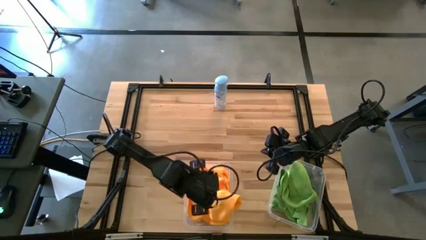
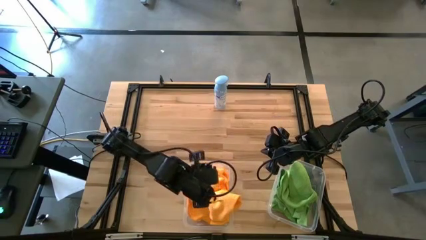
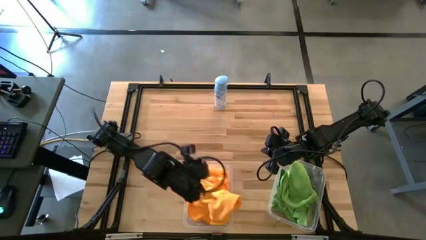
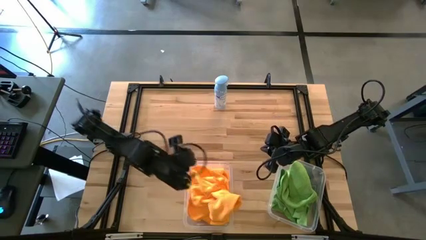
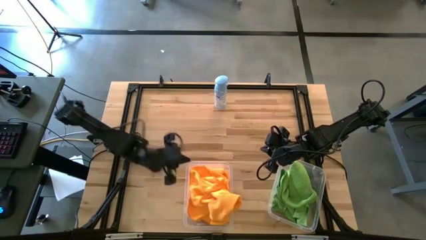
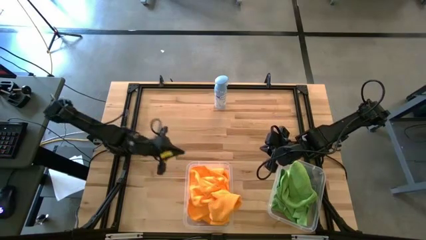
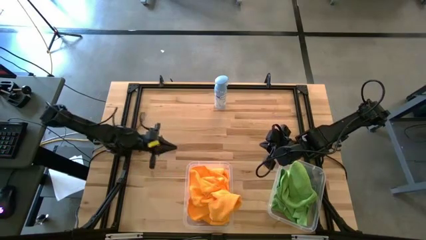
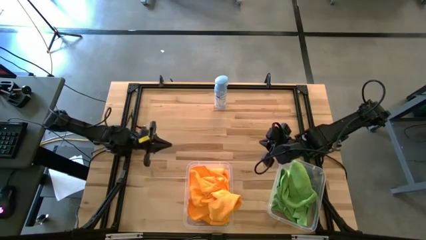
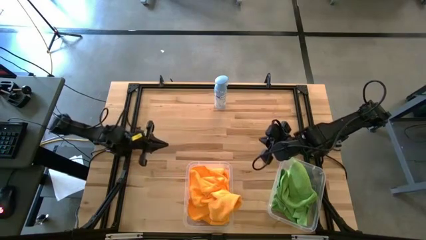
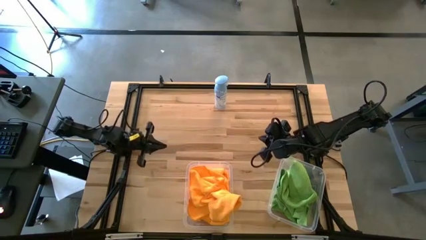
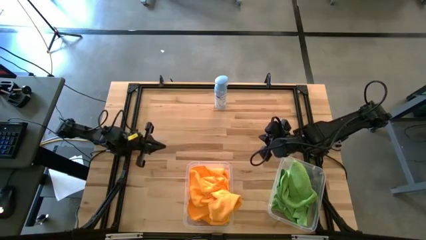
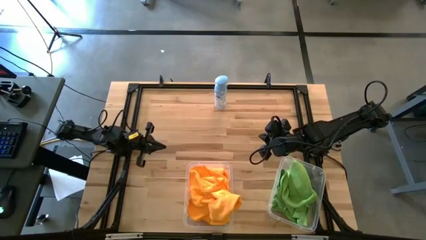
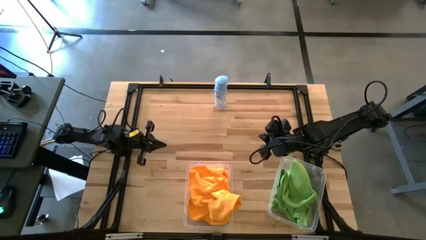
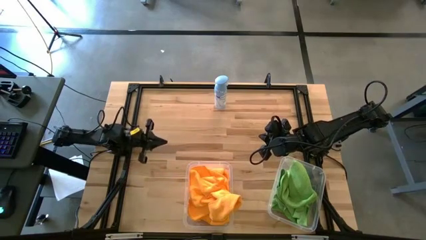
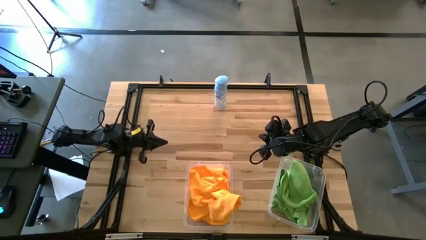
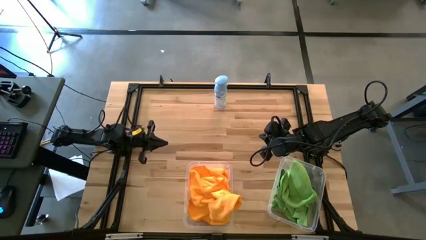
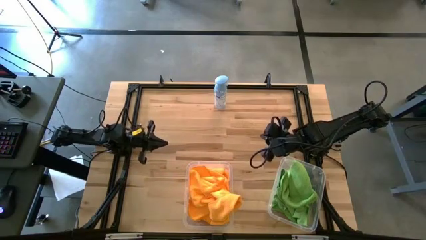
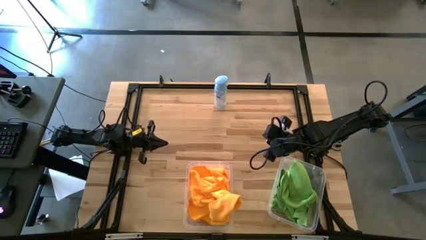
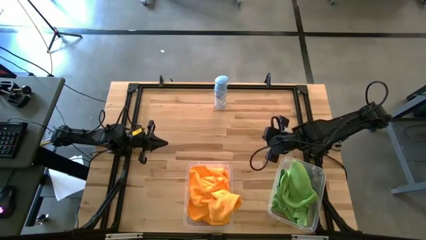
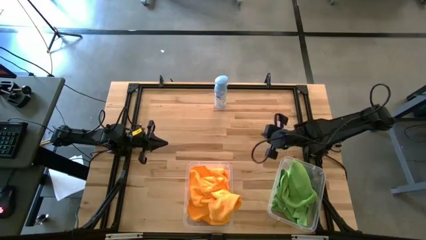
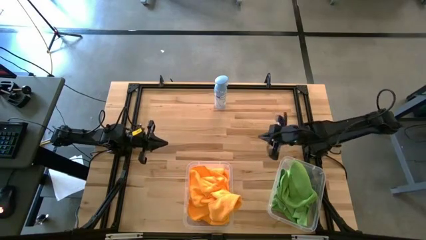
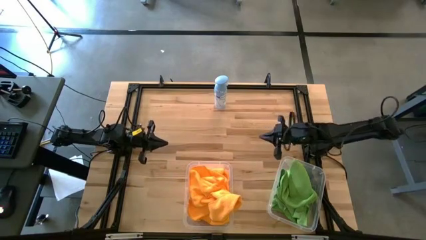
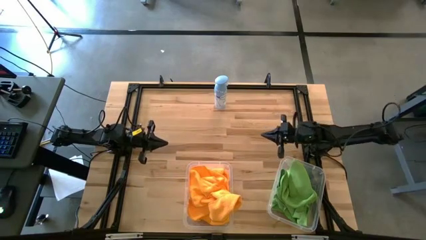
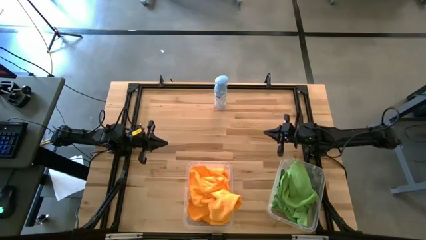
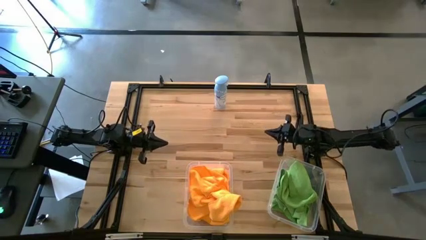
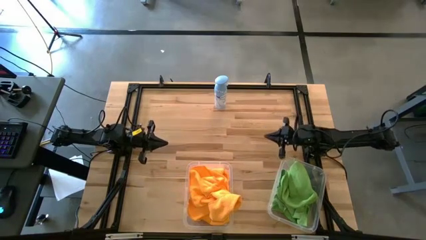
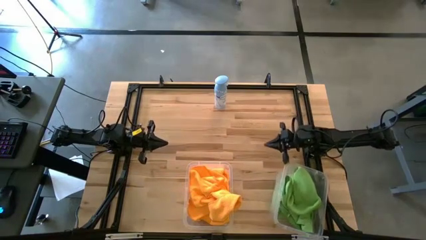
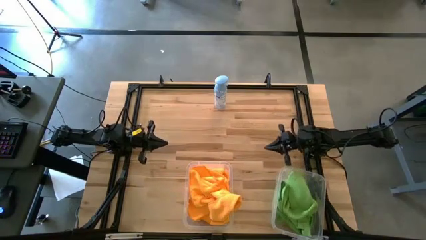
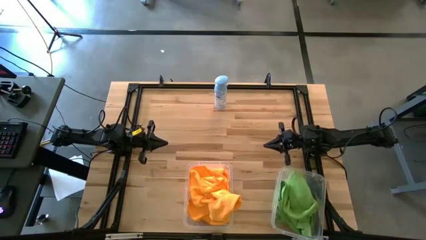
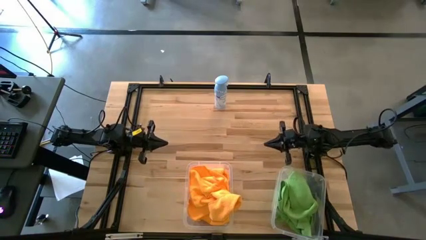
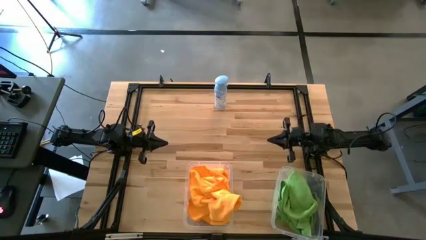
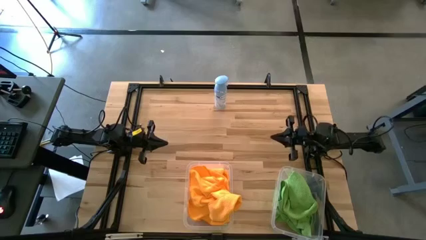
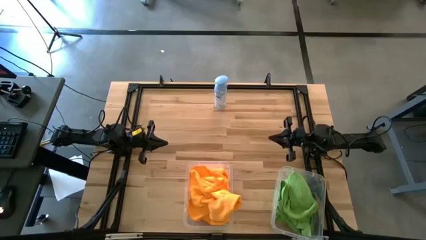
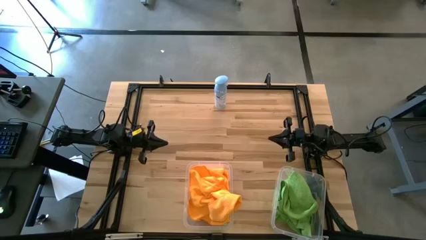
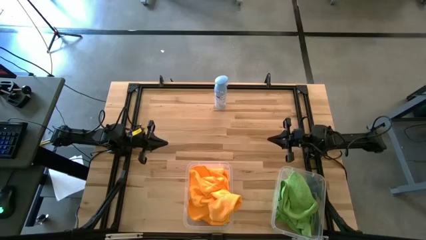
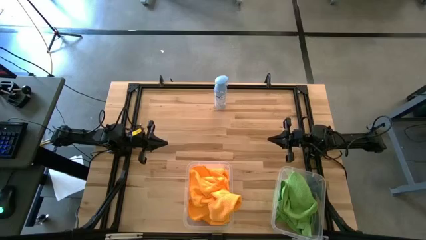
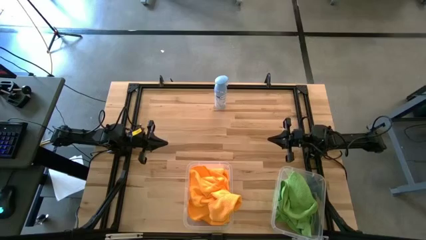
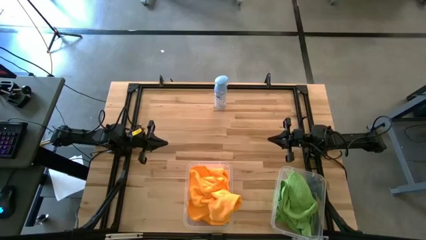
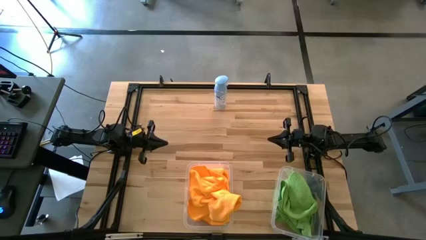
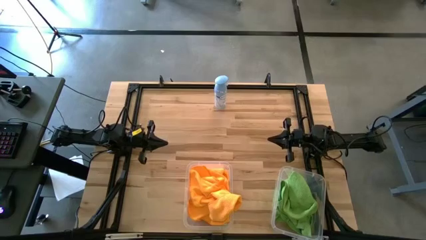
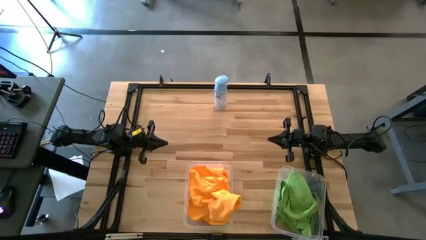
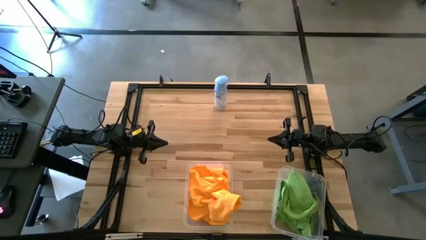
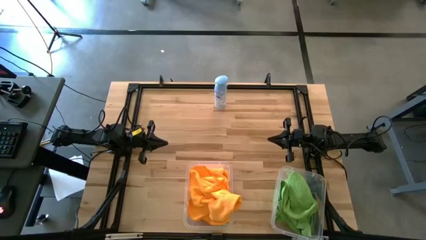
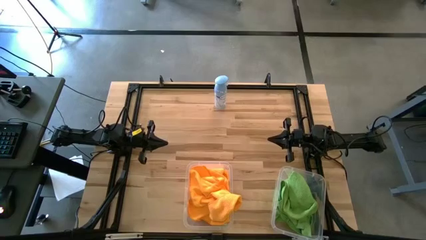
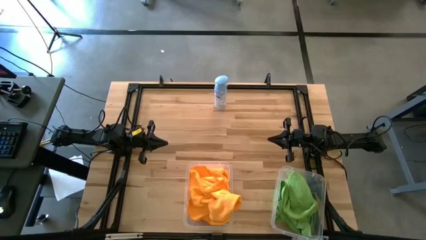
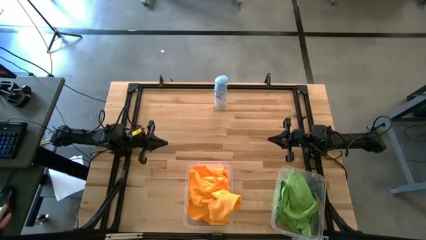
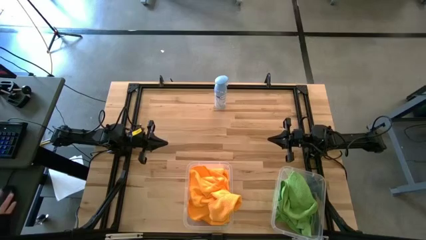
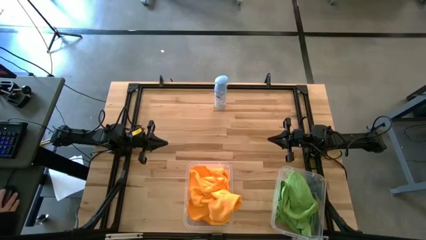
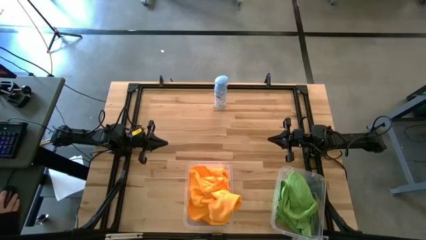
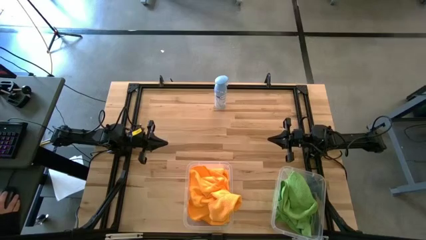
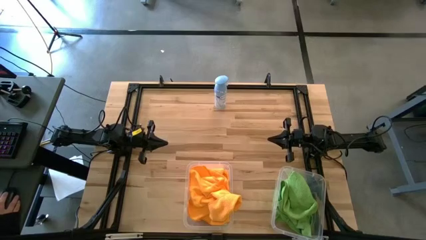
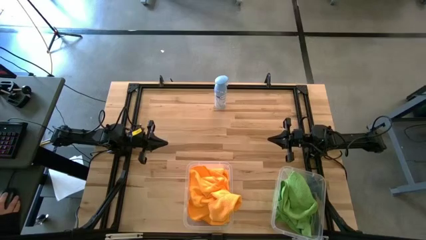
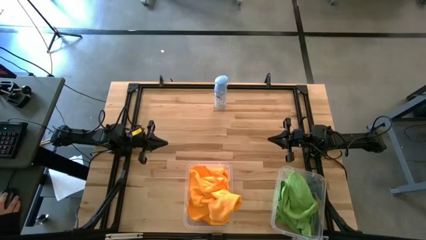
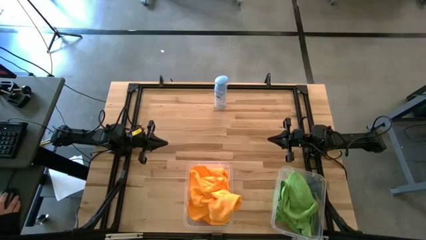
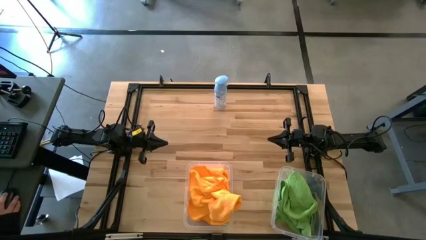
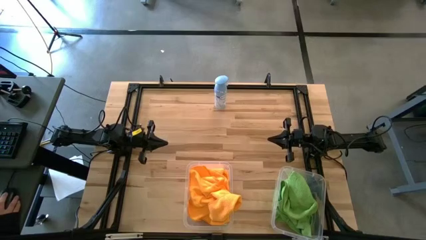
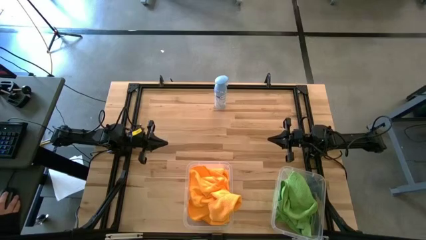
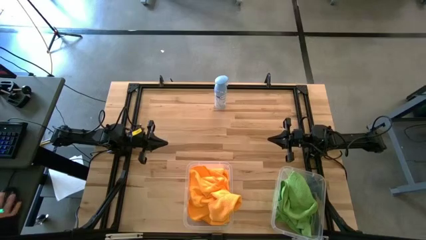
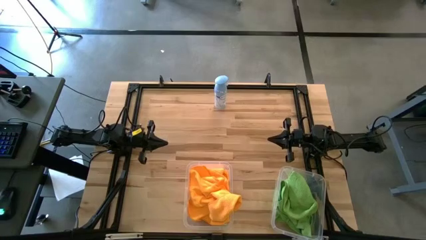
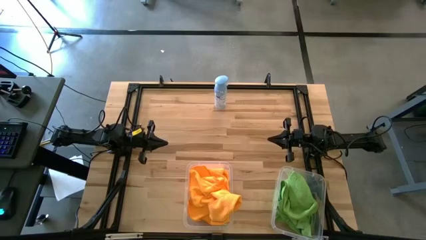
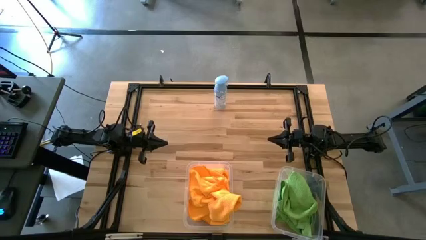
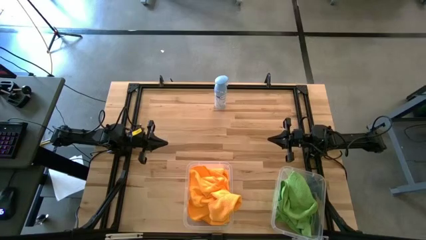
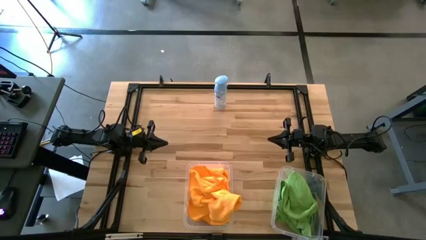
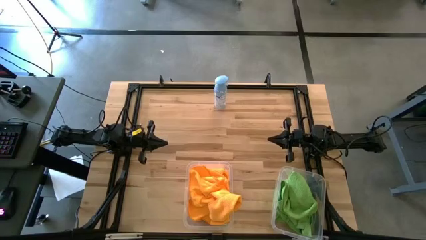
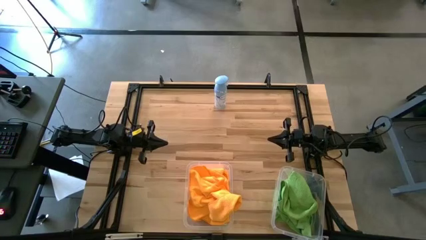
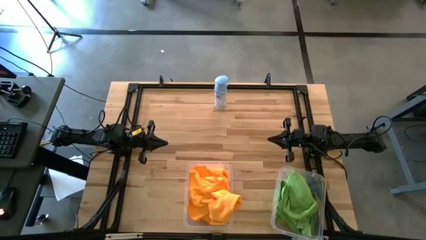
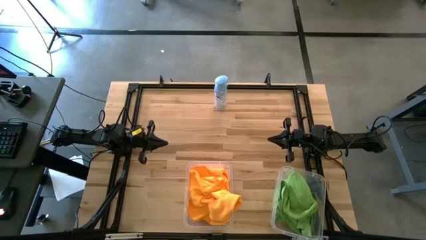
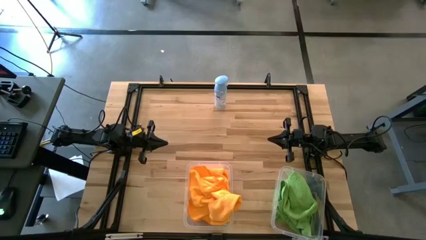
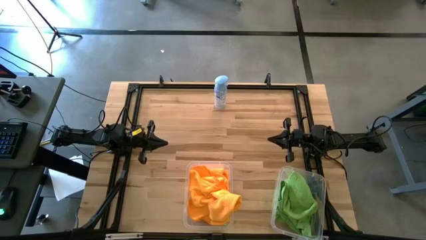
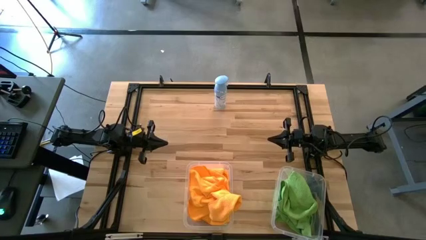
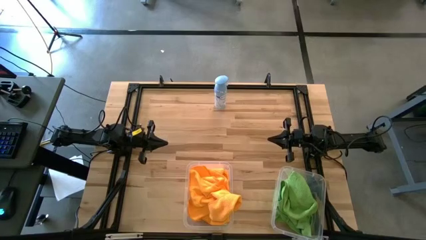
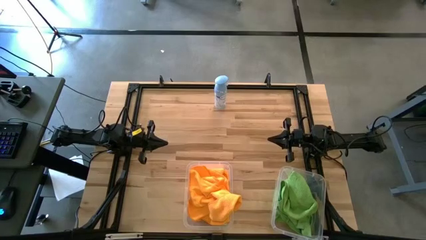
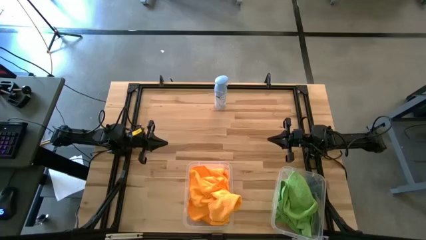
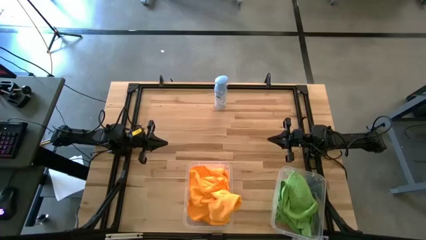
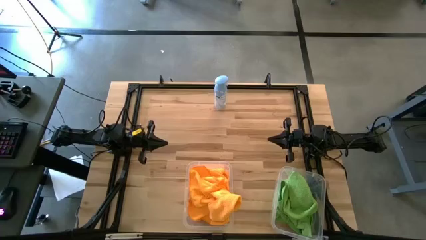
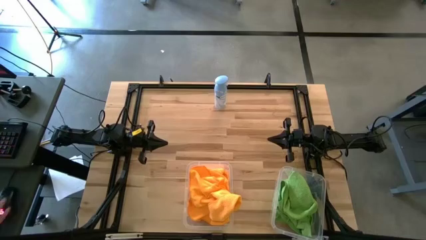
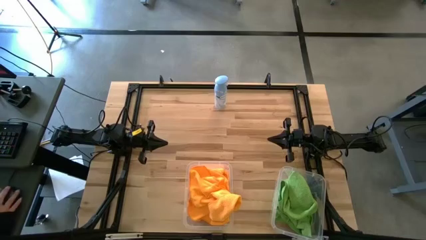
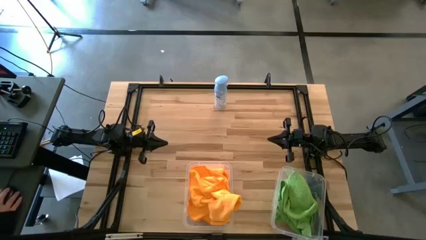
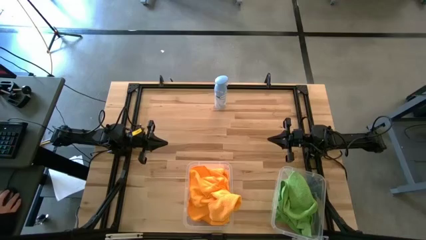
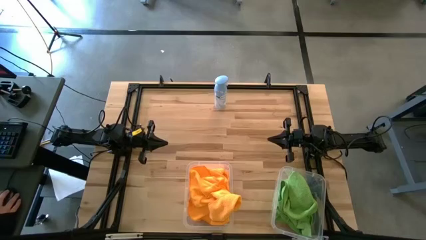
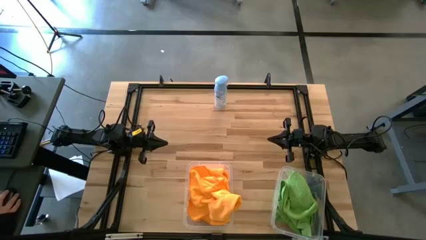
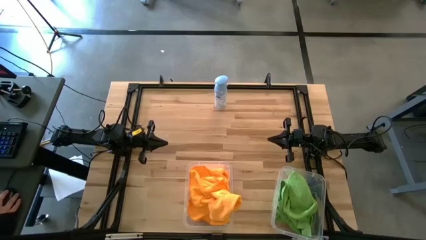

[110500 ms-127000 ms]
Task: Sort microfiber towel by color & place in baskets
Return to Home Position
